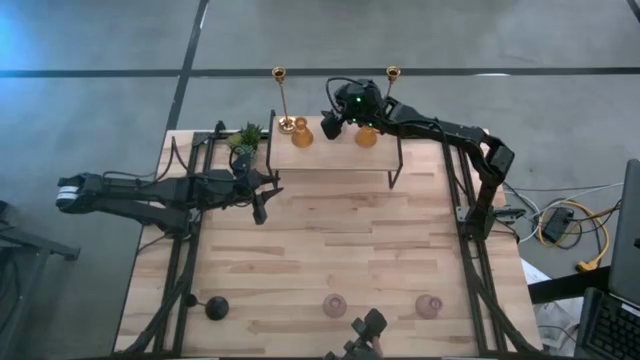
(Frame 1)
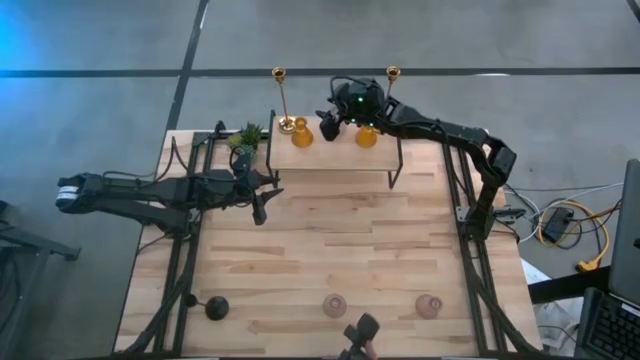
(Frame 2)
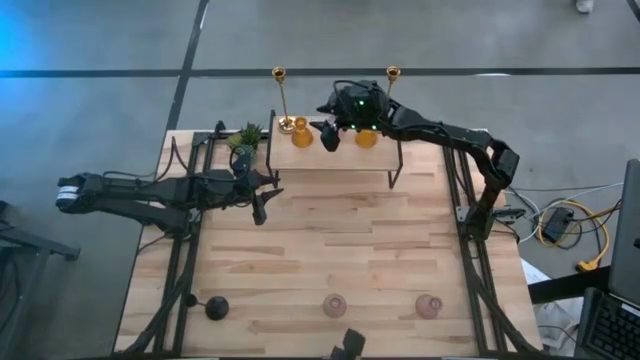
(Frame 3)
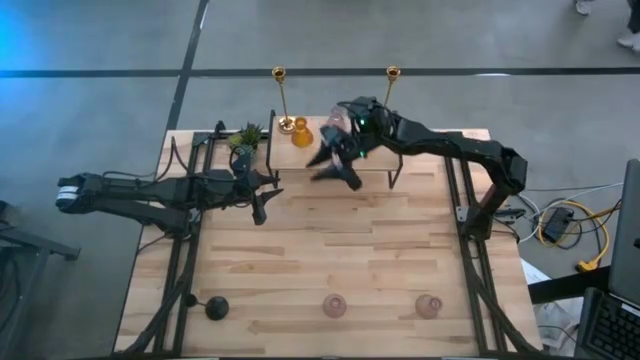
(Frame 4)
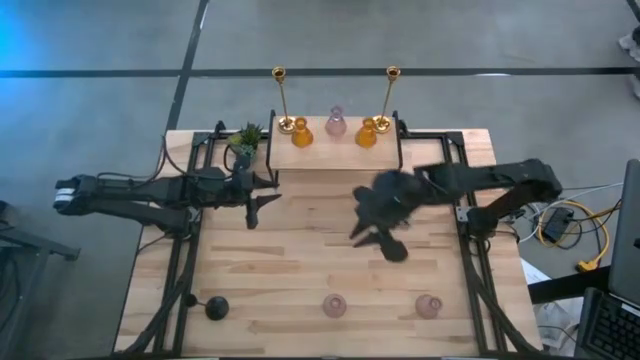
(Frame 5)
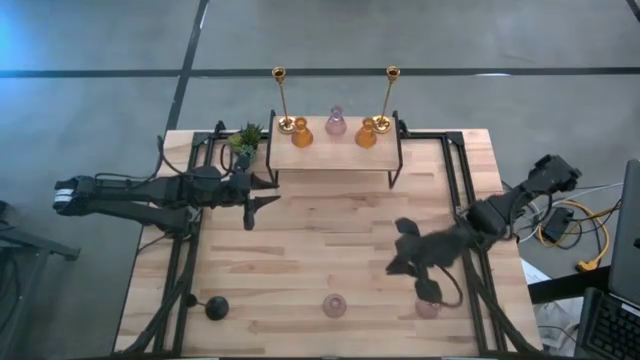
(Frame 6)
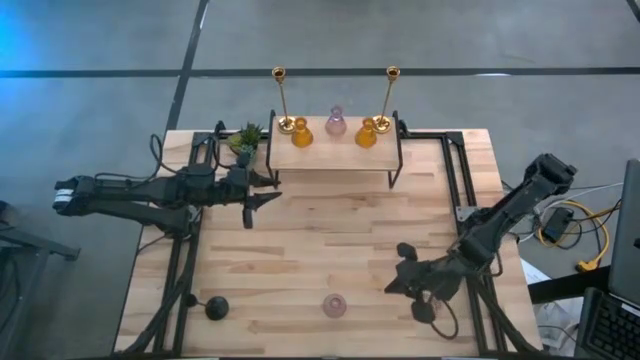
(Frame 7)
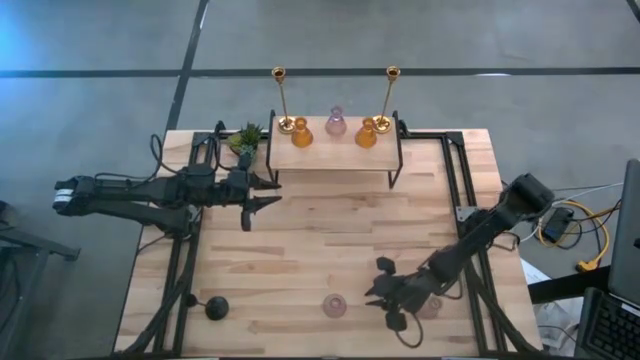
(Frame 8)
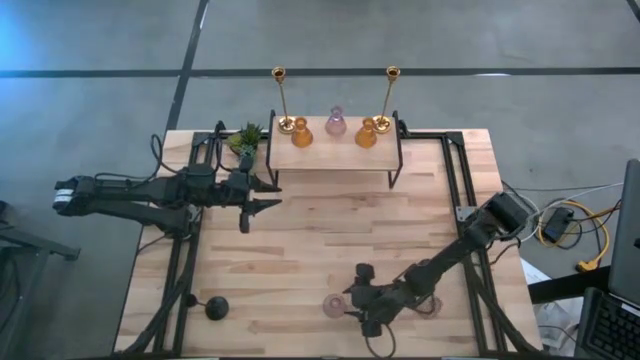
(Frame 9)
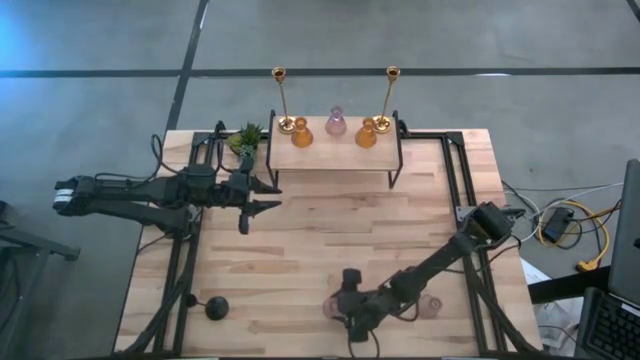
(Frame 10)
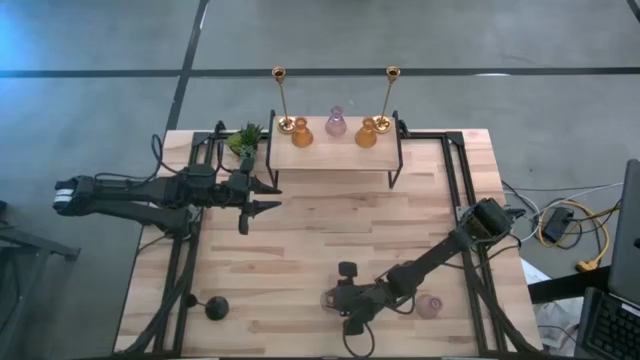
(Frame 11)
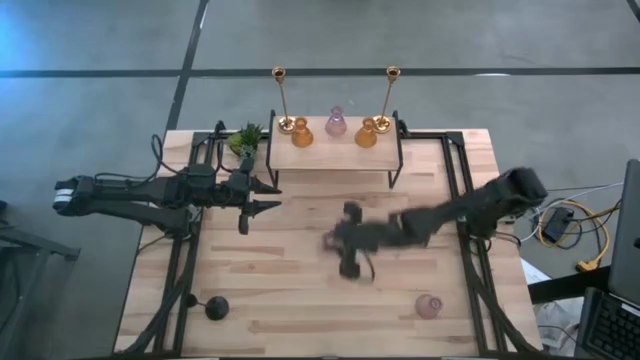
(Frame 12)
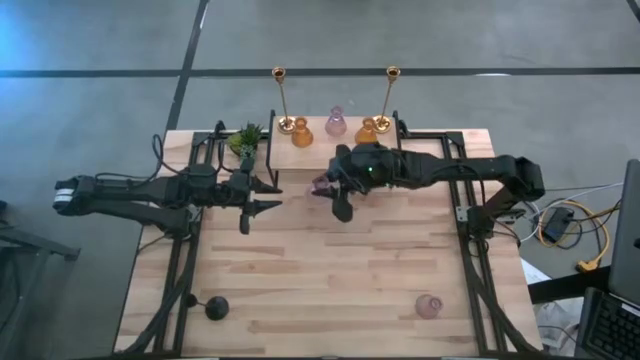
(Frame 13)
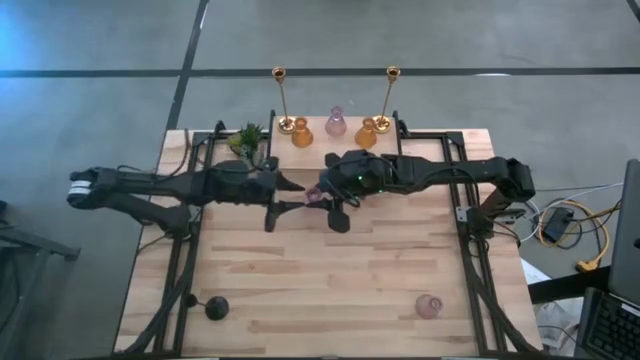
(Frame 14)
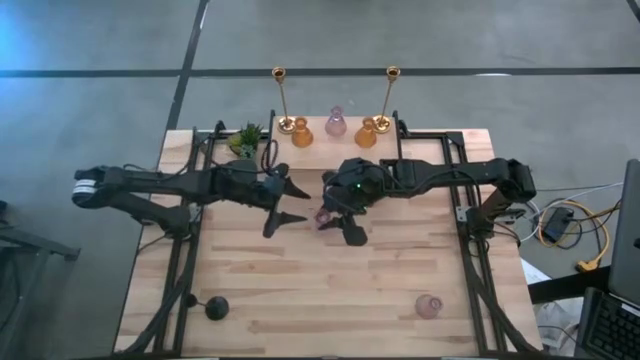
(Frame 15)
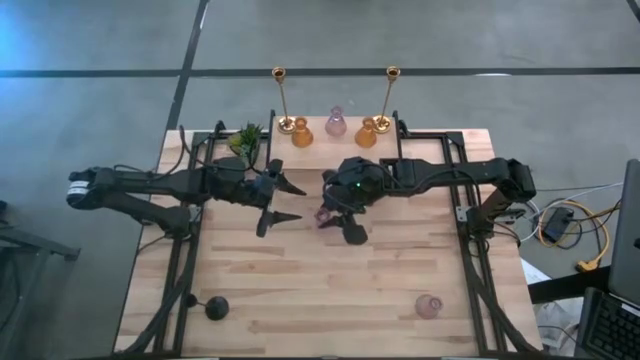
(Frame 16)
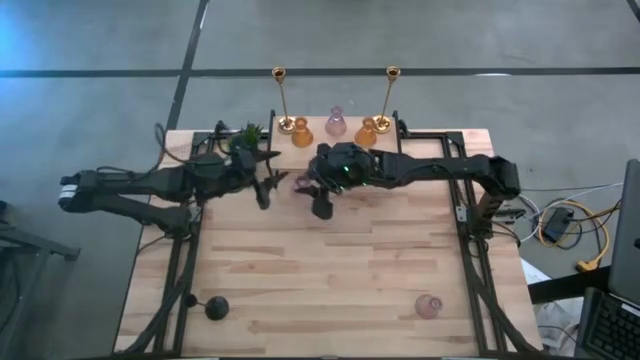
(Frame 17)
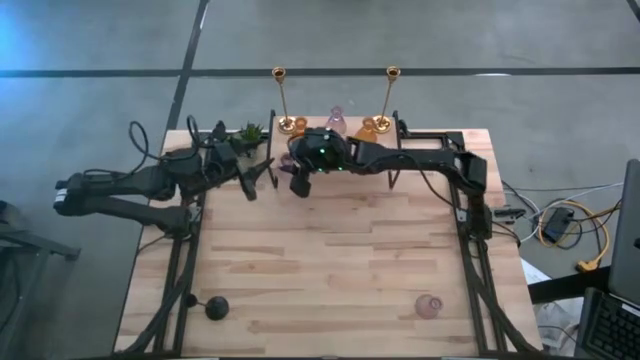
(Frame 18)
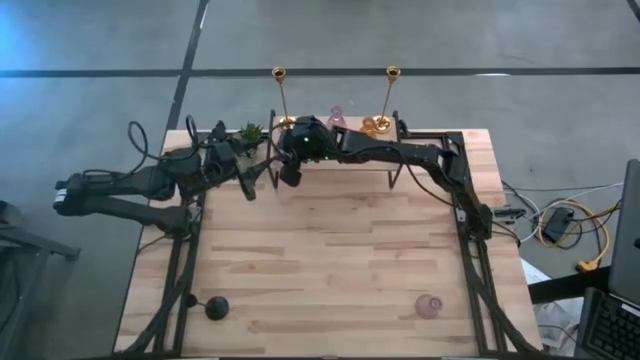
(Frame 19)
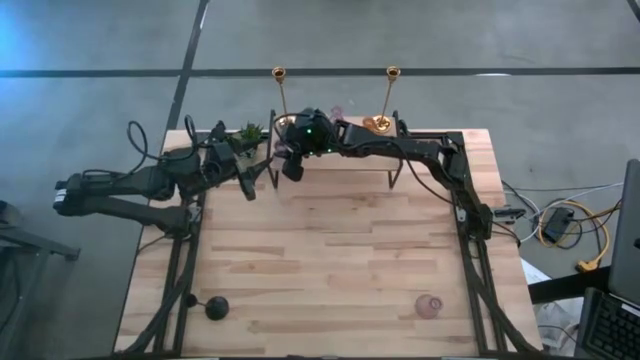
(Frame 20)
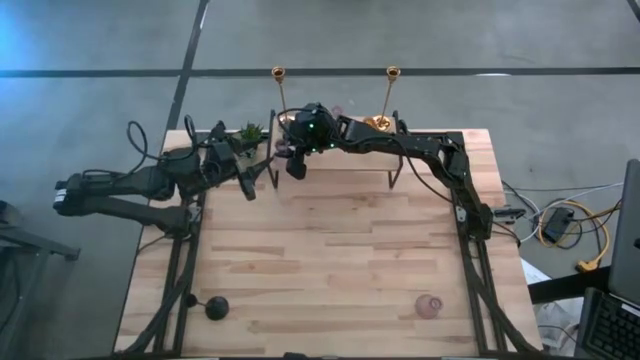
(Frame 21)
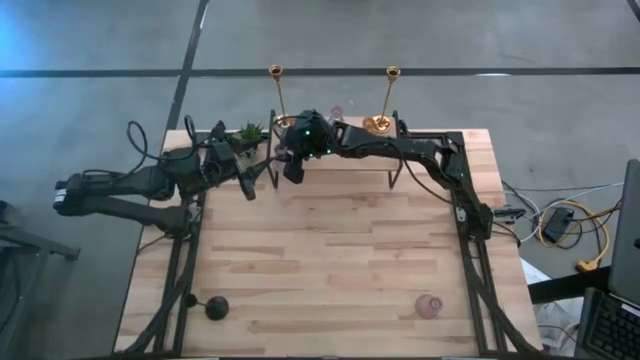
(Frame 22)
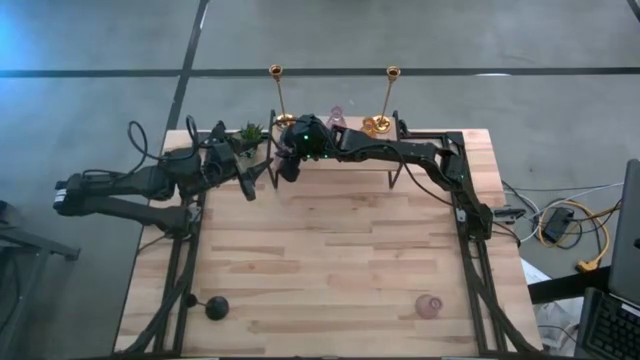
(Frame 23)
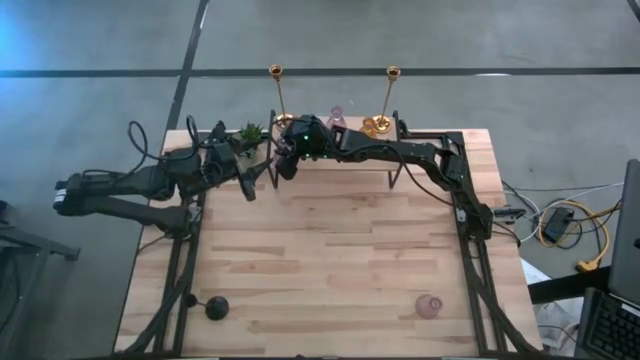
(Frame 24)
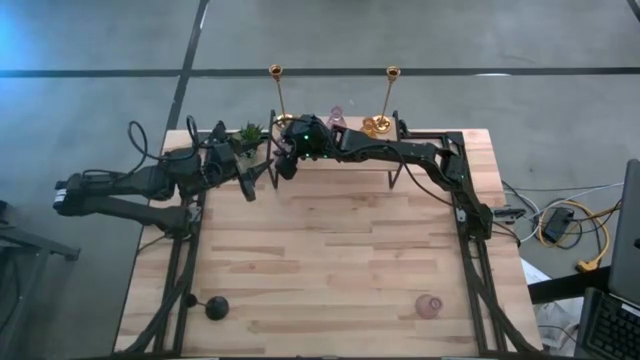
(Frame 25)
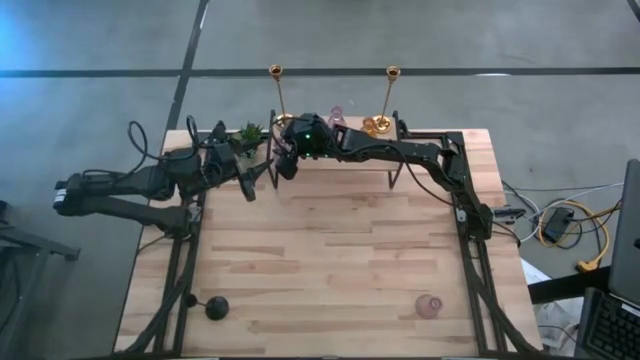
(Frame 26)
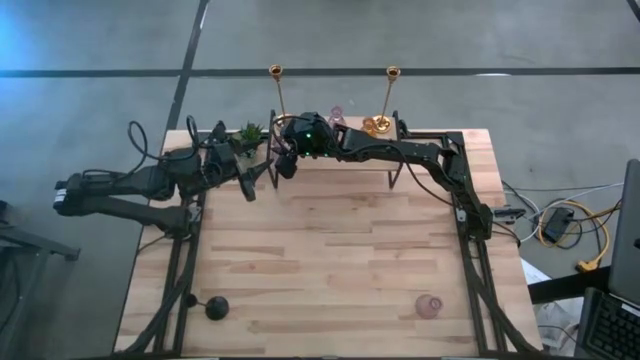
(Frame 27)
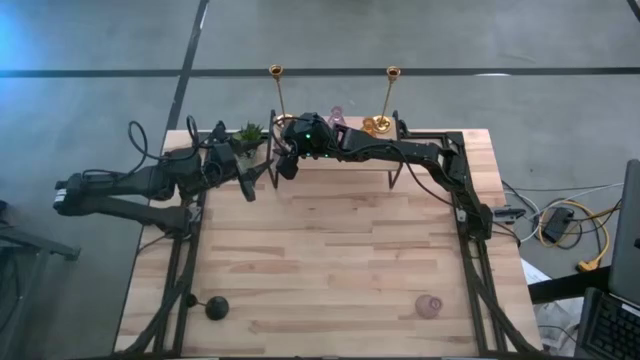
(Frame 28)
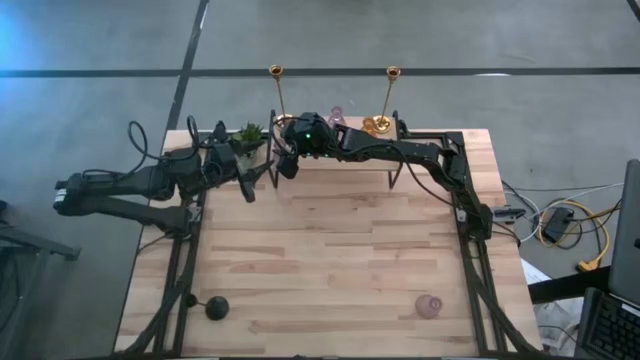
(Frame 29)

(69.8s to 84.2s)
Task: Pick & Place candle stick holders
Put the left pink glass candle holder on the shelf

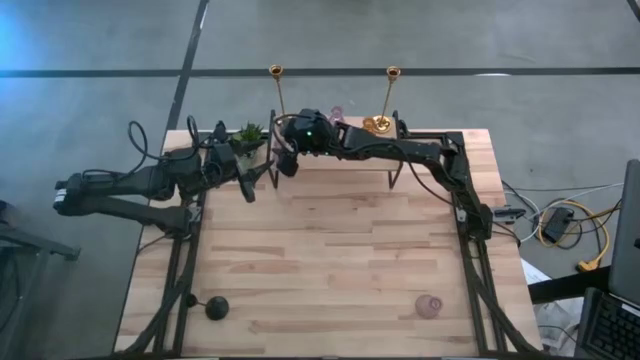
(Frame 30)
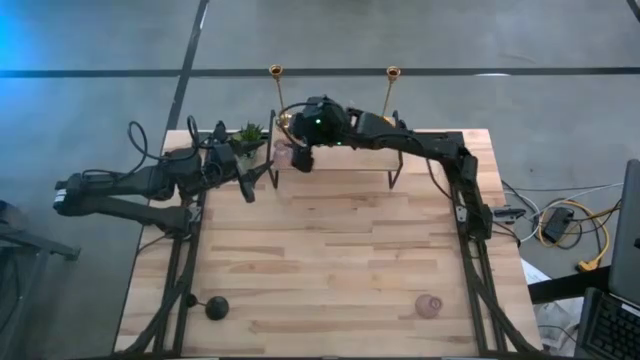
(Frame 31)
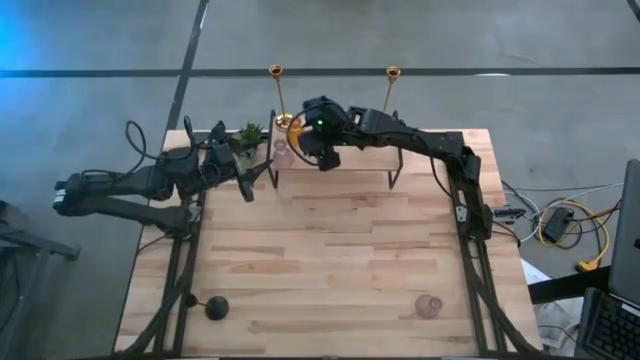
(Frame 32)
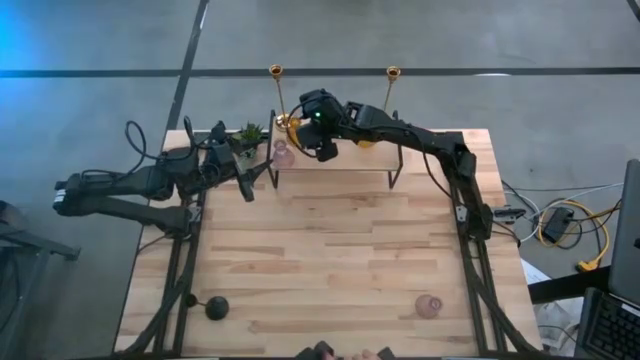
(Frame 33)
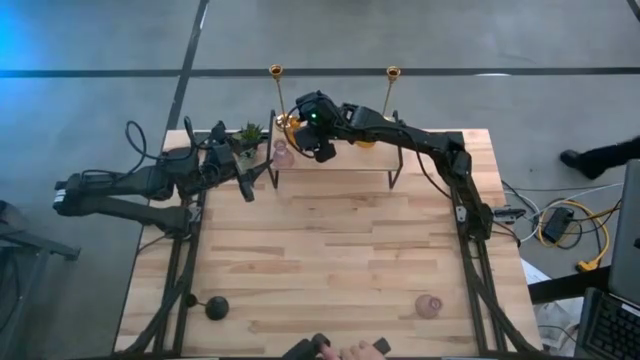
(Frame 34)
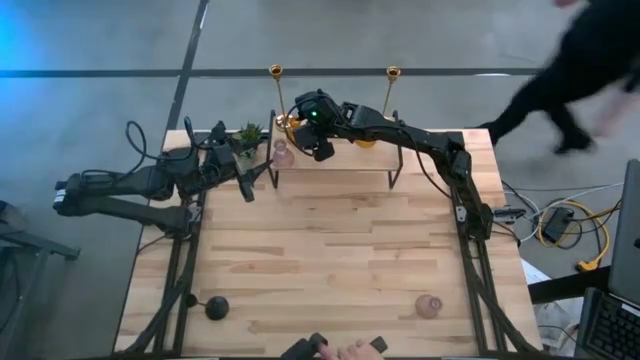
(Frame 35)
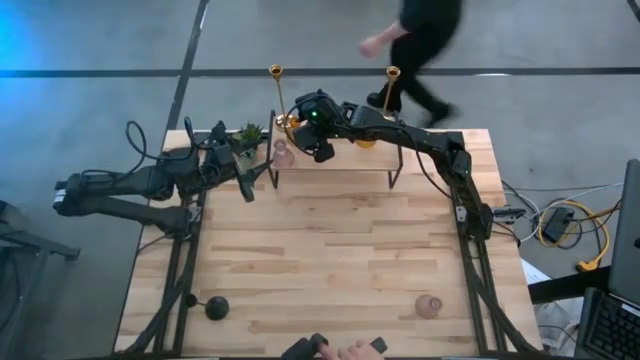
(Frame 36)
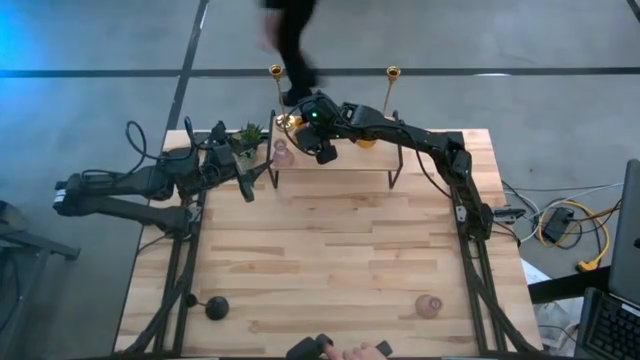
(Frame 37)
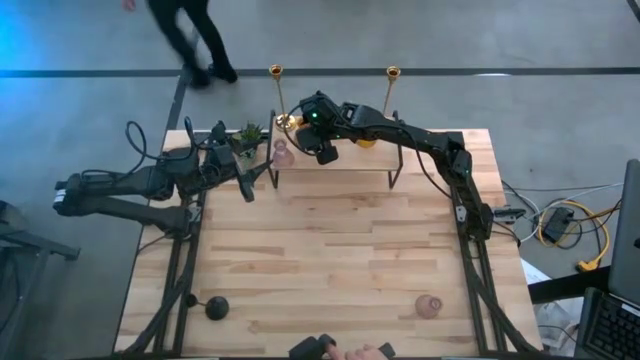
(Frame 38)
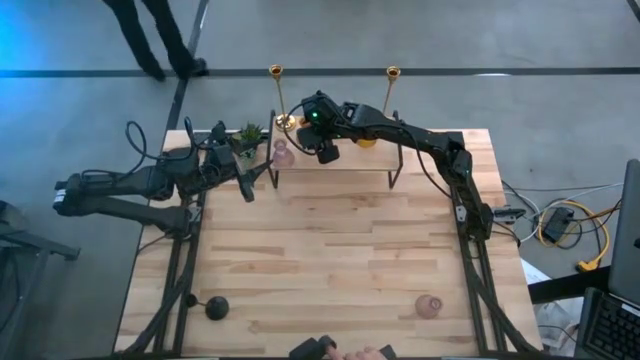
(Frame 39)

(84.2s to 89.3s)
Adjust the left orange candle holder on the shelf
